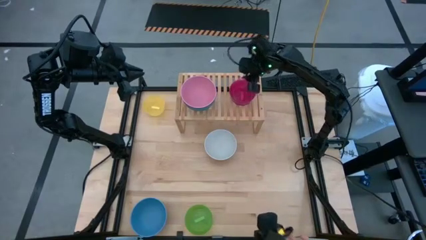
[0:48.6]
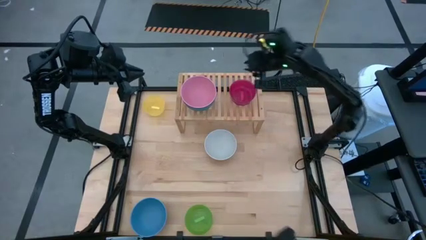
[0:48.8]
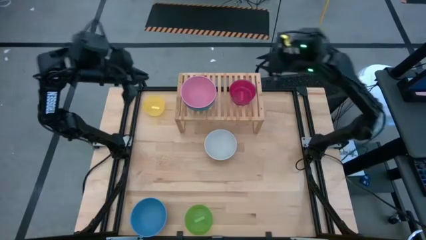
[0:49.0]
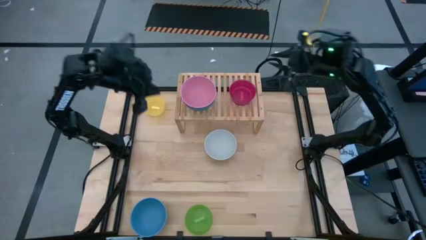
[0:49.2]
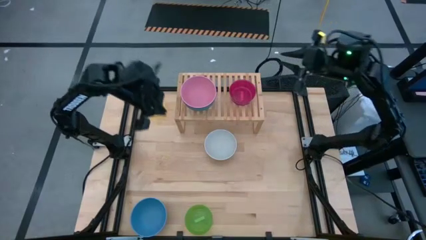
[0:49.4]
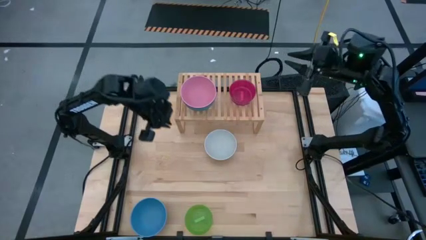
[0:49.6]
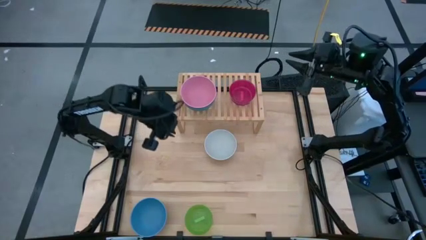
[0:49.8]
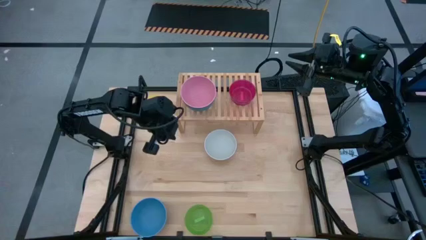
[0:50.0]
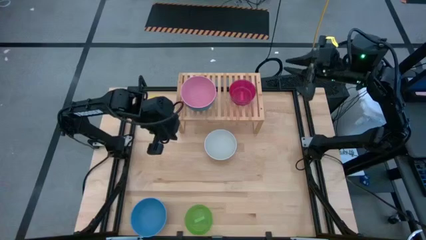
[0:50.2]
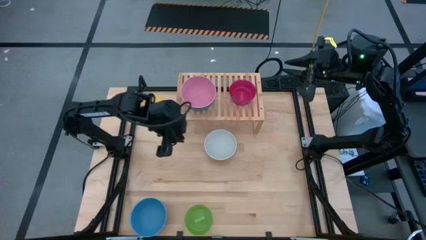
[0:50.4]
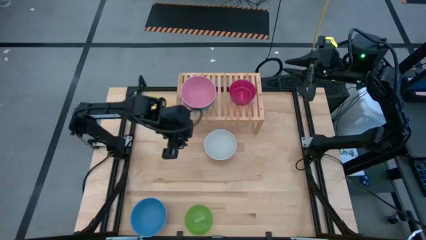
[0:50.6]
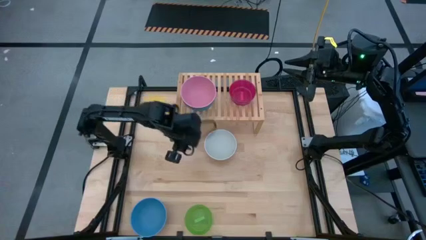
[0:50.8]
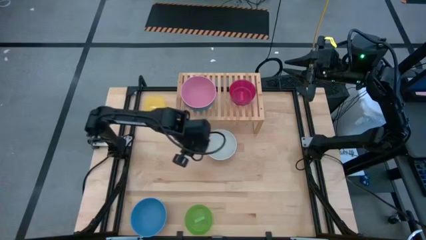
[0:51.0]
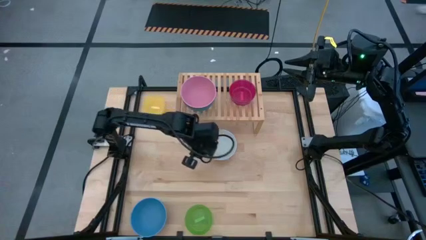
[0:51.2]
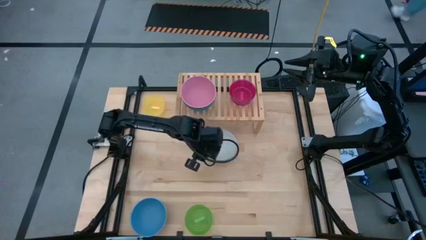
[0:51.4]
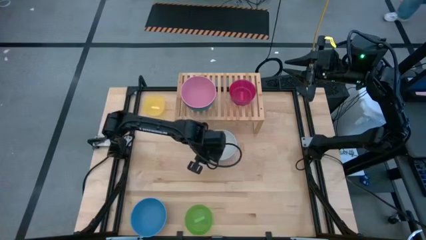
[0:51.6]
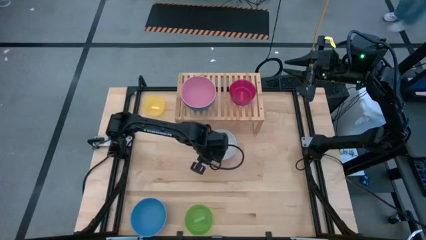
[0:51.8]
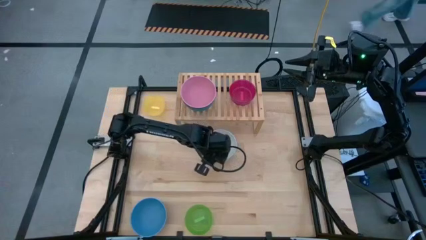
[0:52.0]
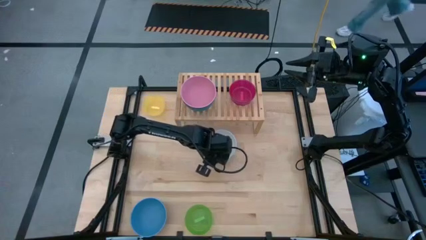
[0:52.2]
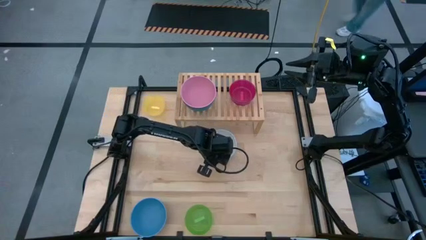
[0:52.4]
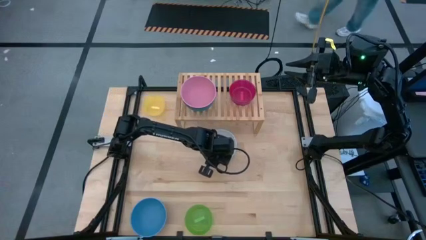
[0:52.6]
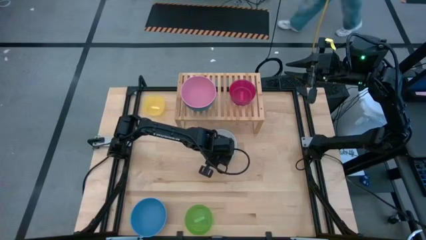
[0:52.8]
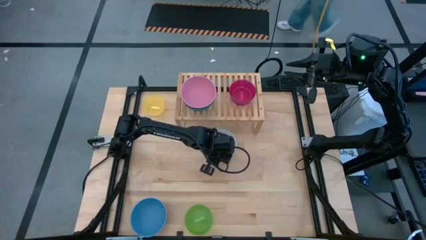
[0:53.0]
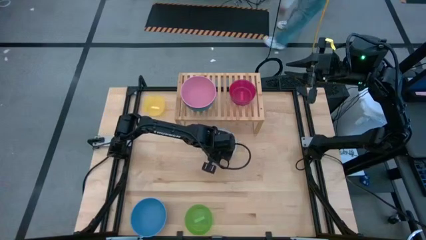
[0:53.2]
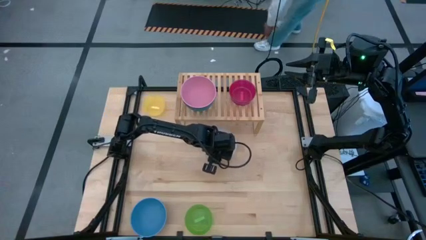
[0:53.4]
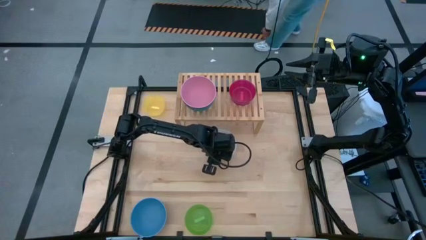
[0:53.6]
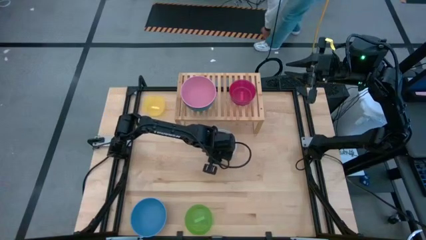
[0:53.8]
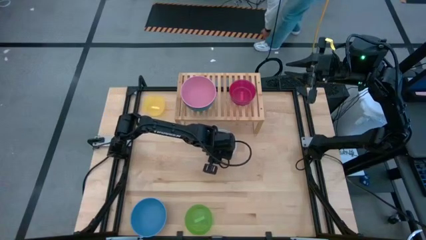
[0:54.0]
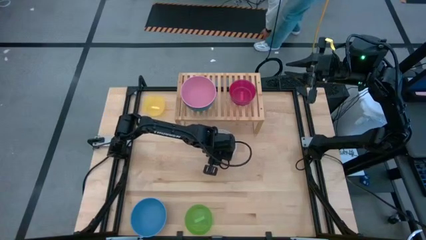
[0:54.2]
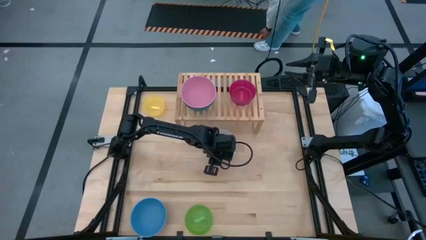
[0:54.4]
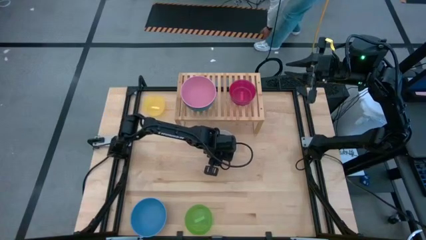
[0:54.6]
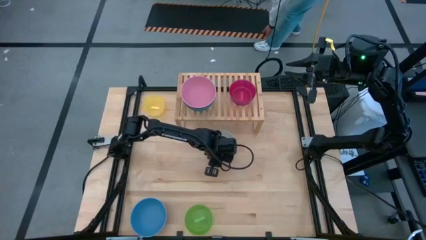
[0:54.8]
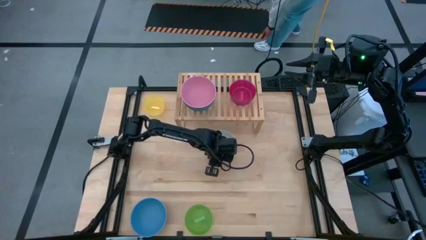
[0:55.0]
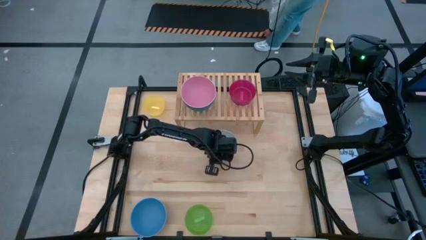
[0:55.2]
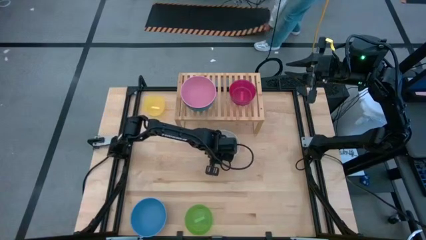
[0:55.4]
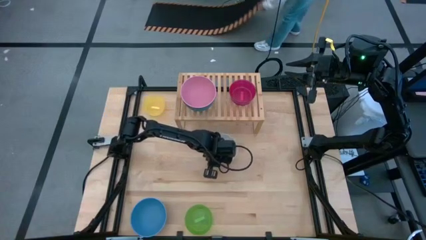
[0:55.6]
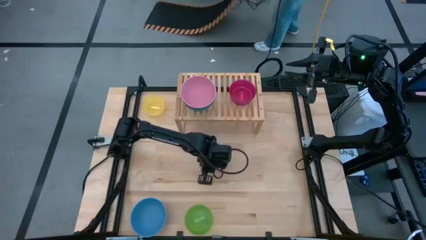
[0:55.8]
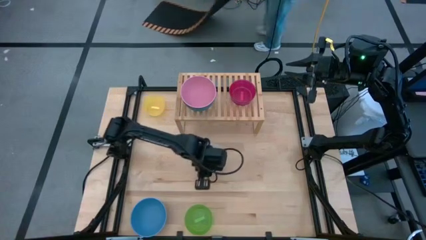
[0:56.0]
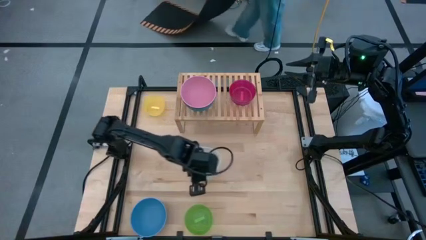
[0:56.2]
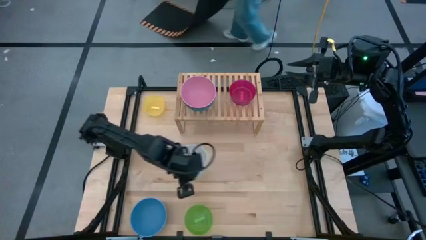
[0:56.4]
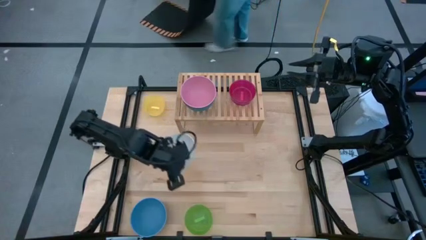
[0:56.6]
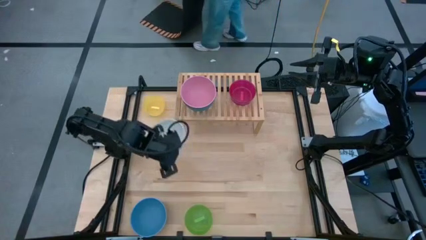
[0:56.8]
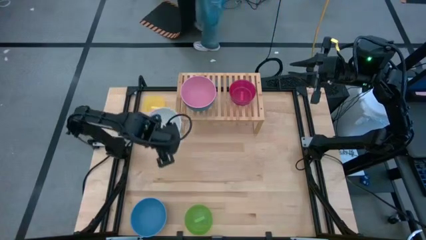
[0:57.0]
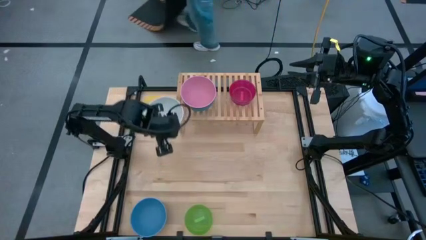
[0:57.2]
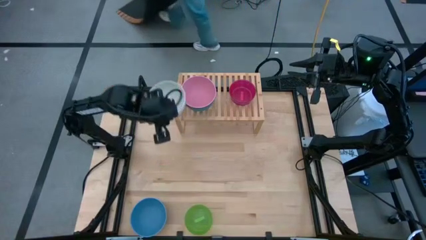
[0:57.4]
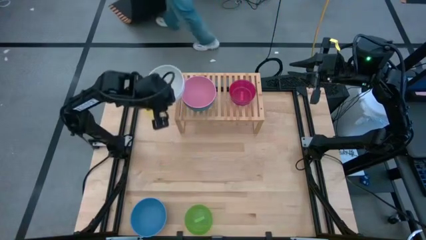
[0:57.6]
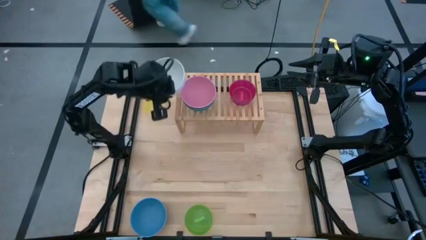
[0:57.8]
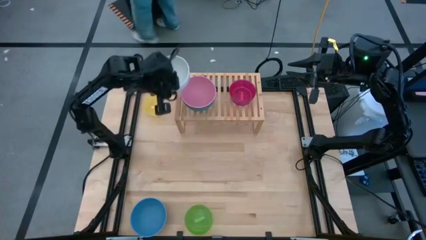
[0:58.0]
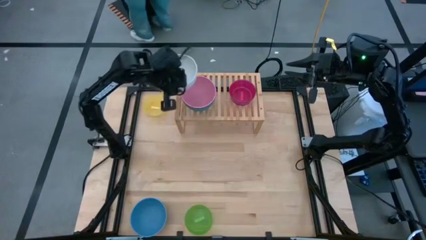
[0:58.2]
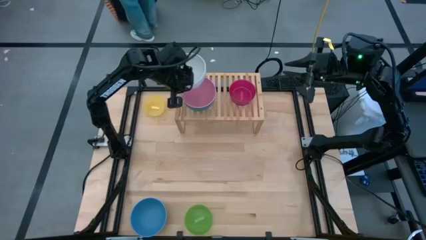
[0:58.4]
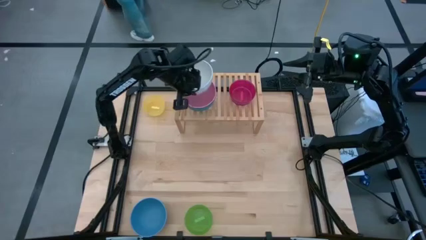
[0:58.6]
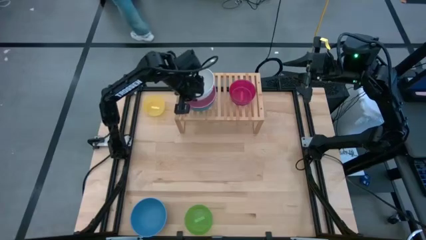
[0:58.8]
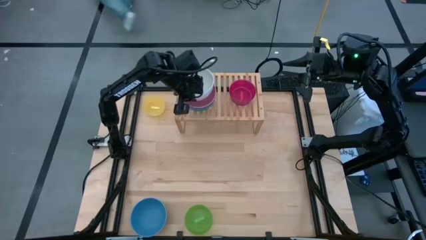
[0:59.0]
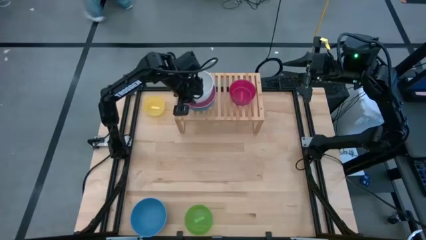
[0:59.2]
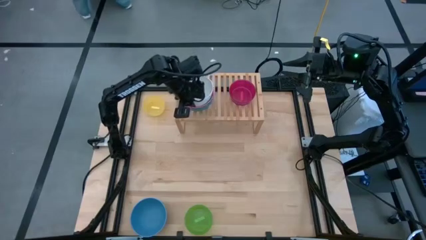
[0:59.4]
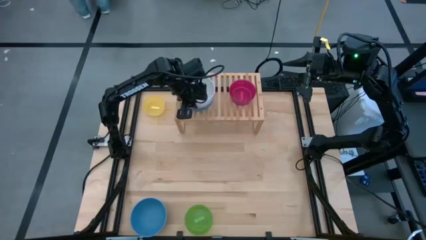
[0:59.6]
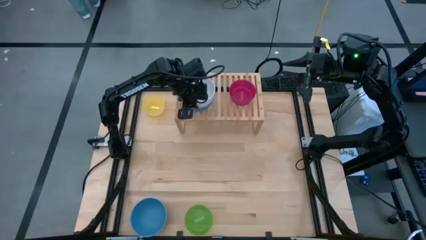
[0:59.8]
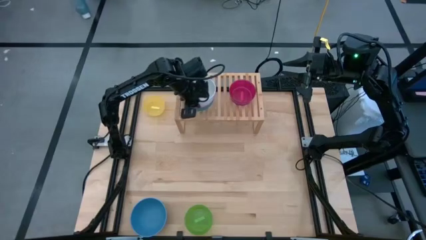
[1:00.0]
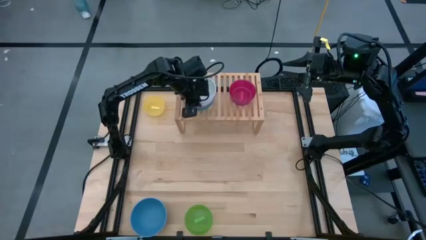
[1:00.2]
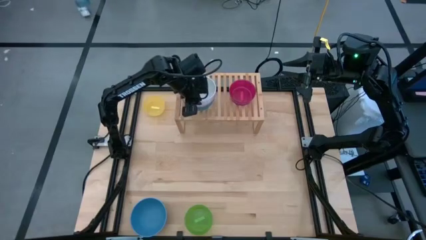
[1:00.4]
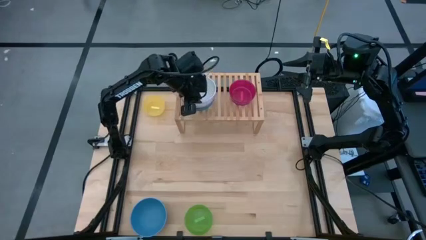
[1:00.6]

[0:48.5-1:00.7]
Task: Place and stack bowls onto a shelf
Stack the white bowl on top of the pink bowl on the shelf

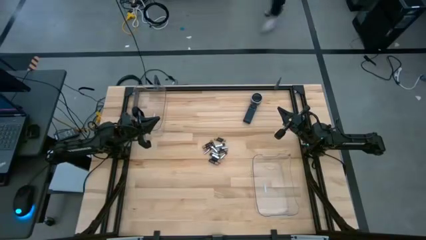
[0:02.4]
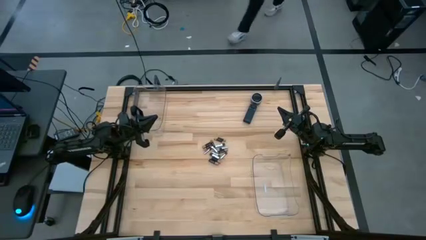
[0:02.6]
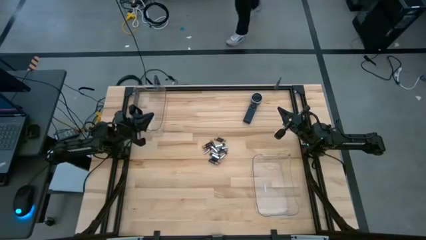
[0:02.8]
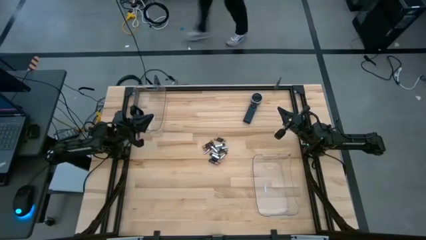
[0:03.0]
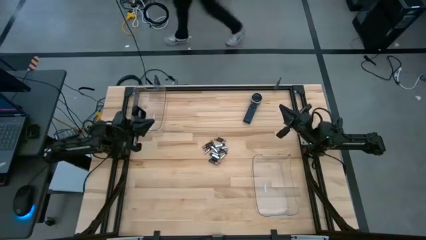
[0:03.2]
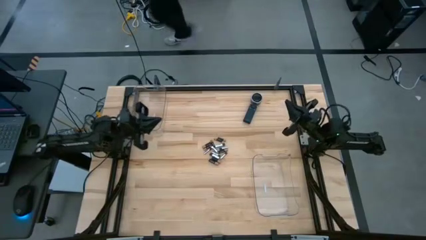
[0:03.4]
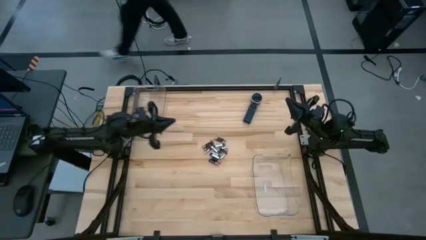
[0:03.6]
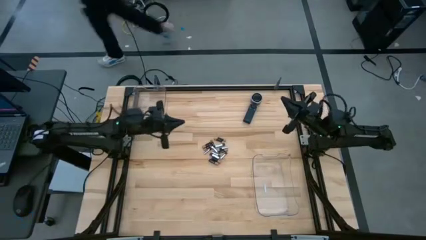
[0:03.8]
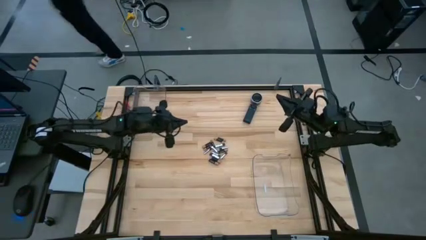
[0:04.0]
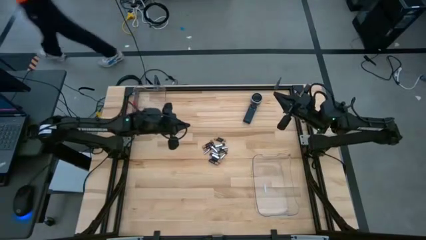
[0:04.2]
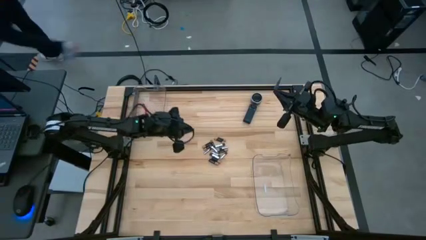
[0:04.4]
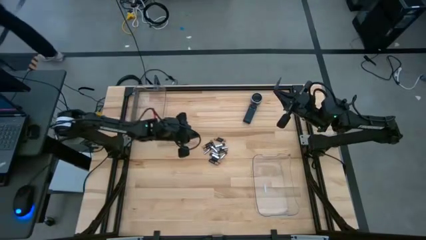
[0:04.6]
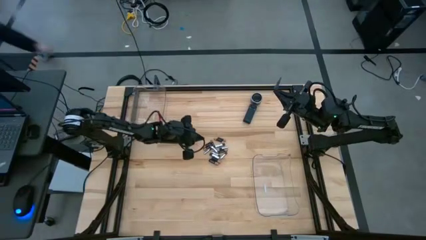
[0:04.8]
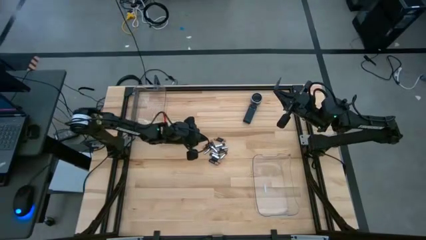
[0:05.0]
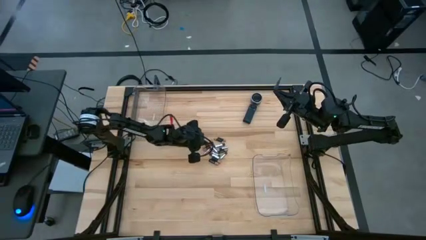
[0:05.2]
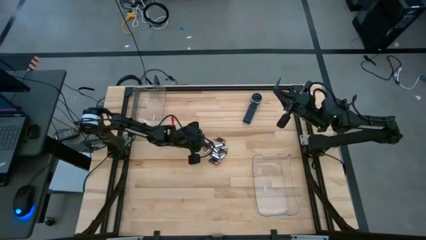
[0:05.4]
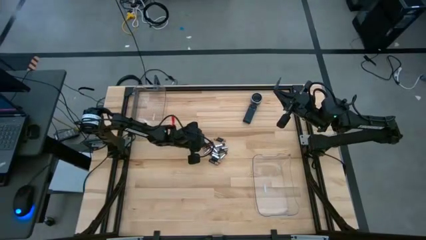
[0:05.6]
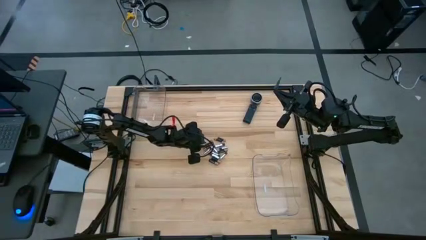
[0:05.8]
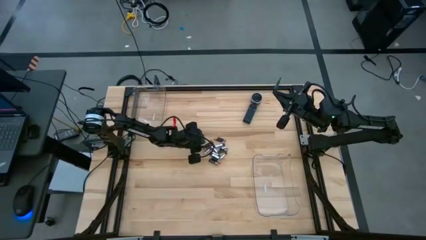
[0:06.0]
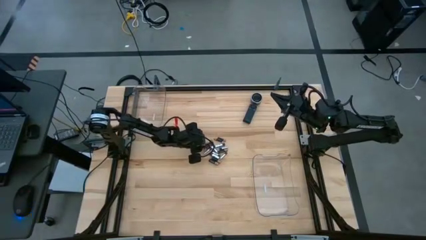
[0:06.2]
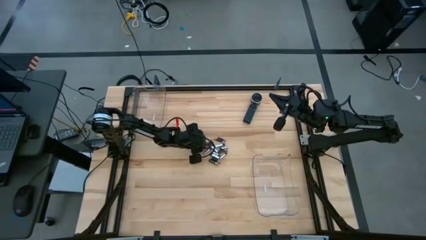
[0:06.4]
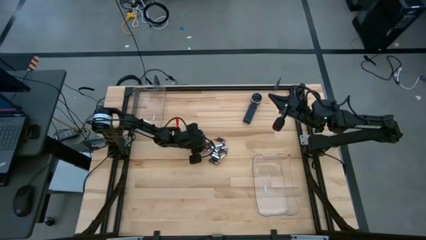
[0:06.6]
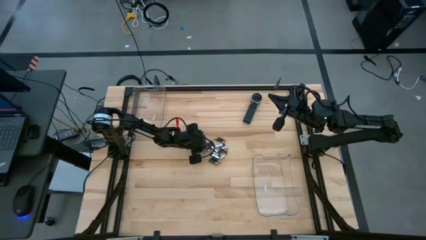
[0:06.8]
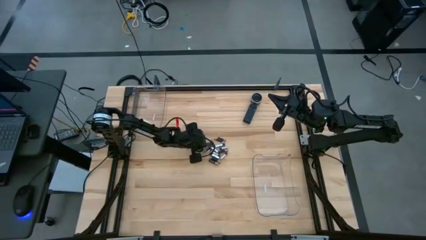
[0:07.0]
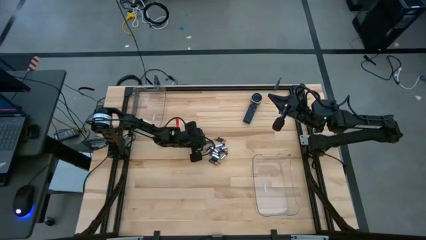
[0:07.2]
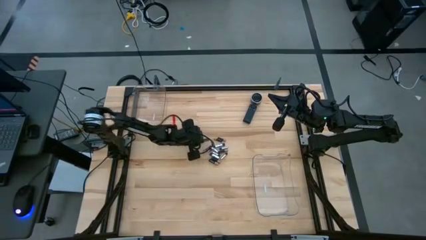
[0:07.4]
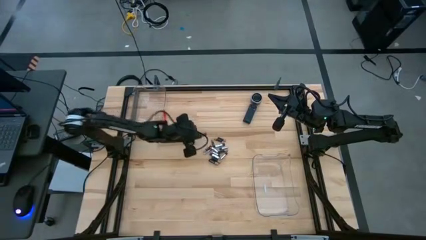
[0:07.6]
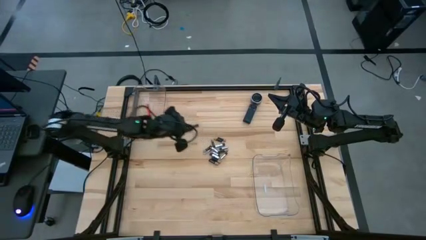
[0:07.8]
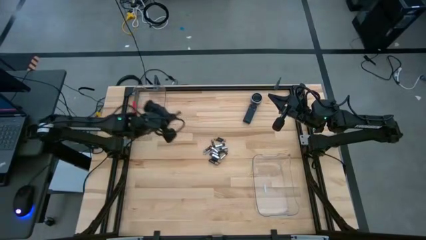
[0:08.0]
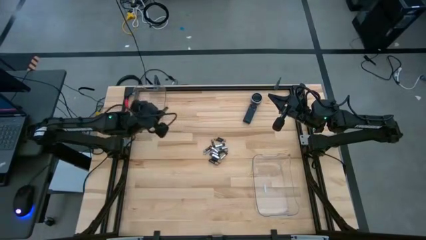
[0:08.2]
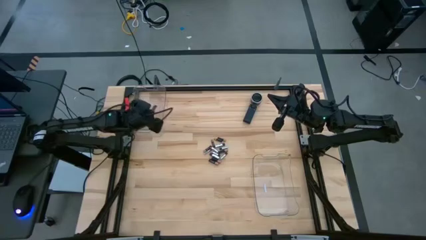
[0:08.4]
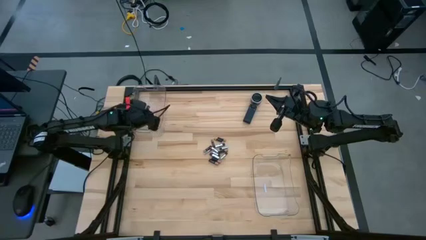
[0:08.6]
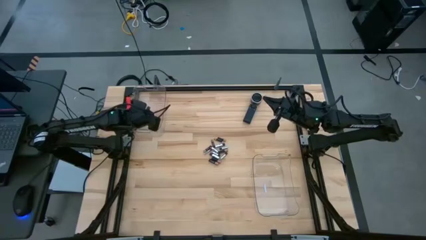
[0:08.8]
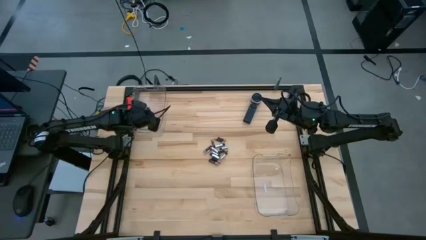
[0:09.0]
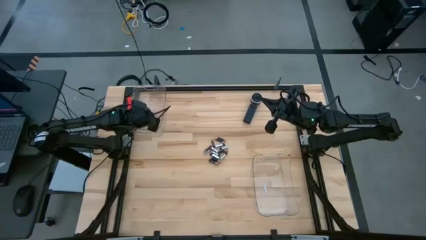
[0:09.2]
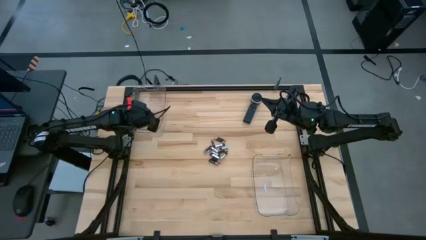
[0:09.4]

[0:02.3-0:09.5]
Task: Sort batteries
Put the black battery into the top transparent bin
